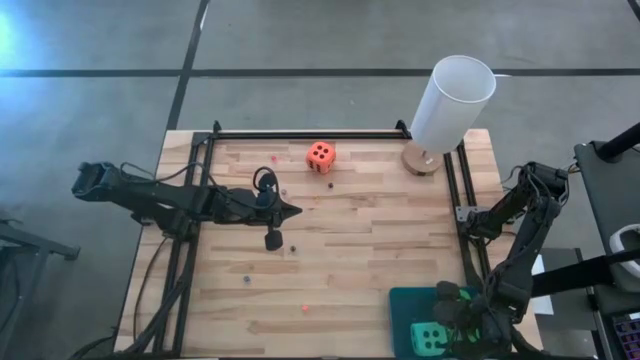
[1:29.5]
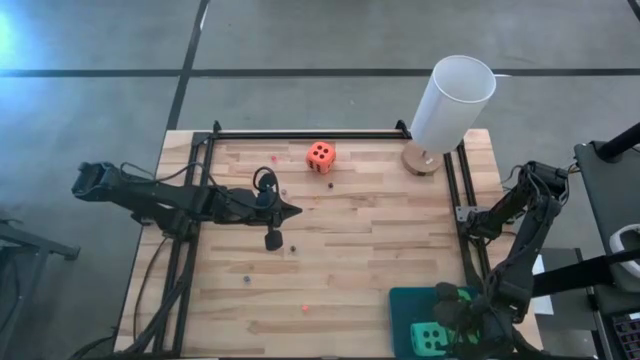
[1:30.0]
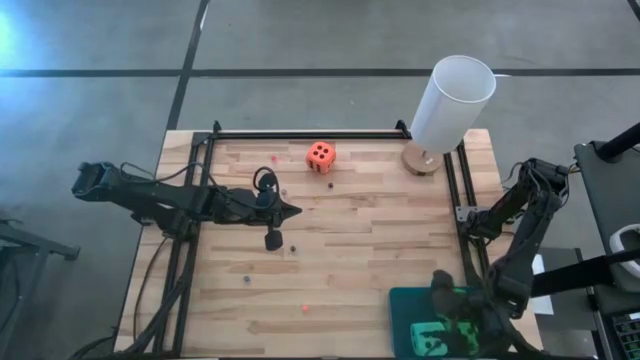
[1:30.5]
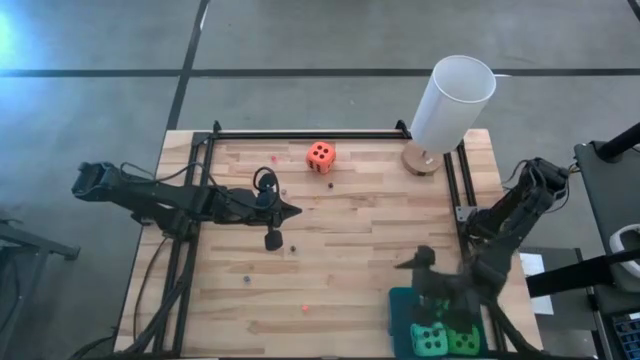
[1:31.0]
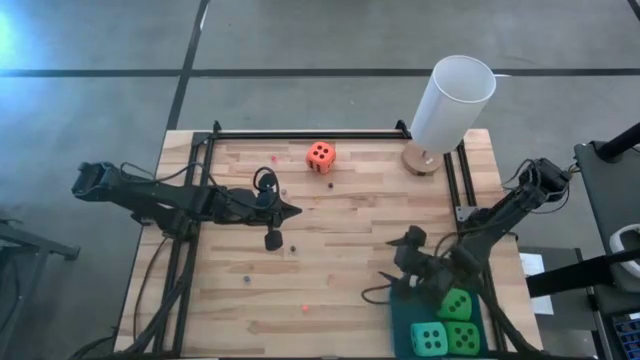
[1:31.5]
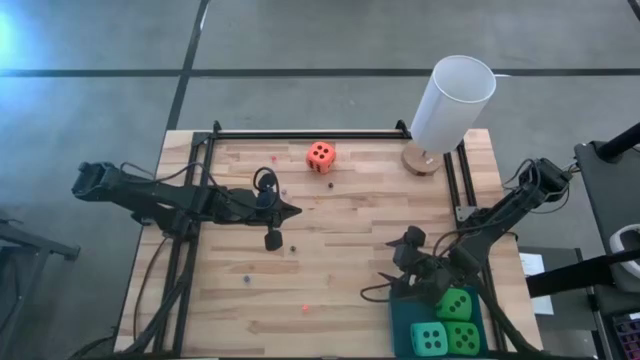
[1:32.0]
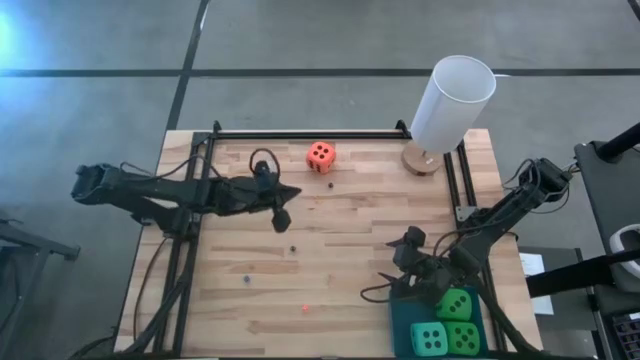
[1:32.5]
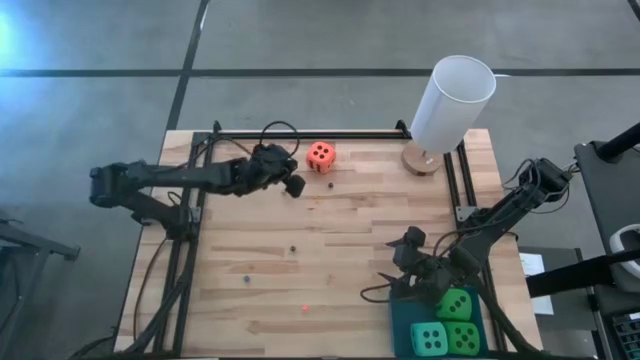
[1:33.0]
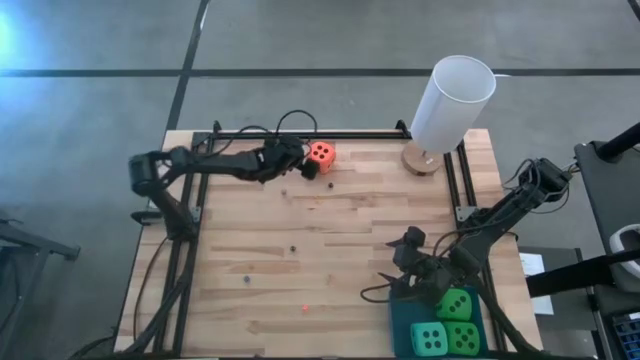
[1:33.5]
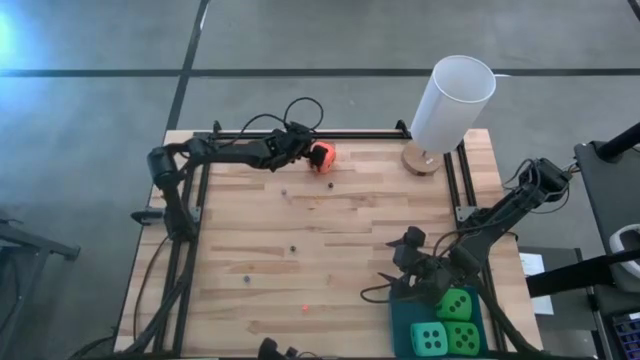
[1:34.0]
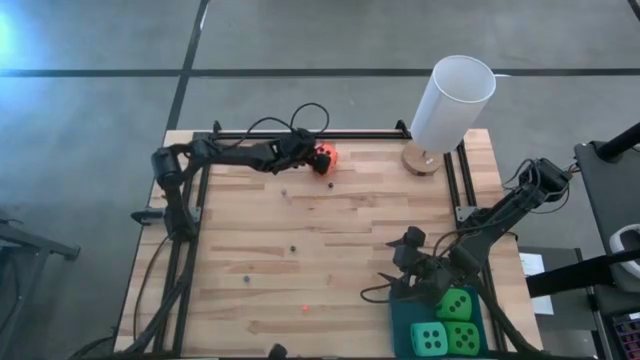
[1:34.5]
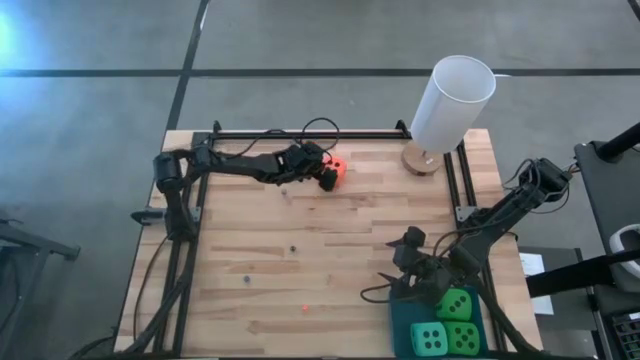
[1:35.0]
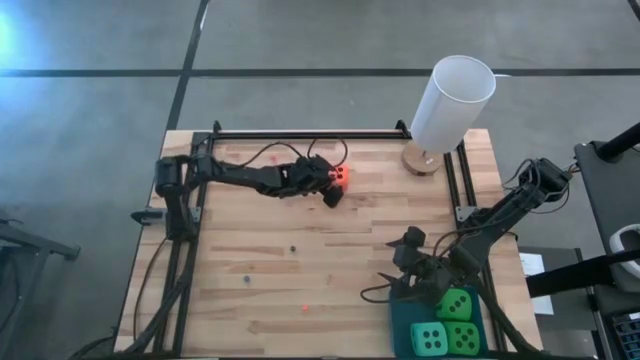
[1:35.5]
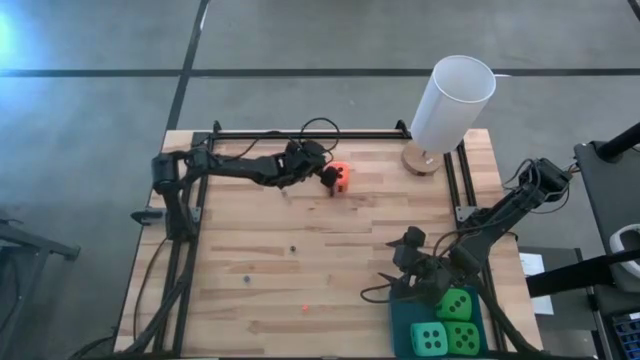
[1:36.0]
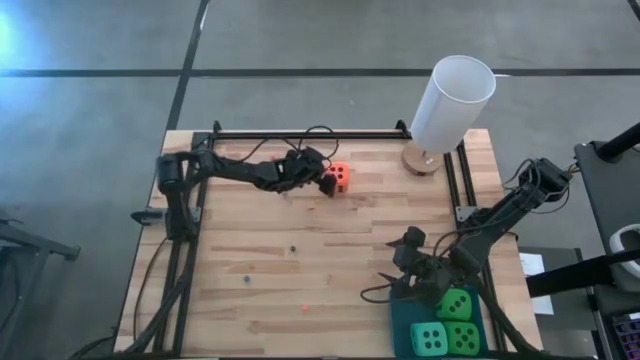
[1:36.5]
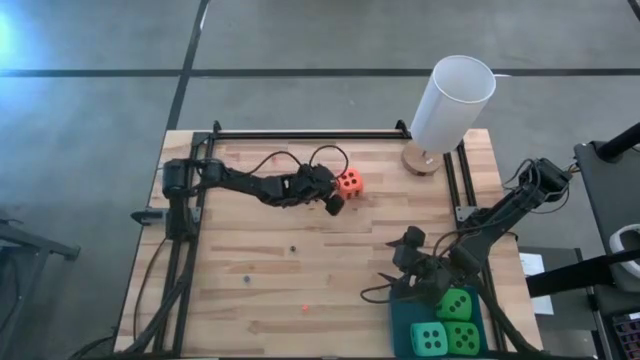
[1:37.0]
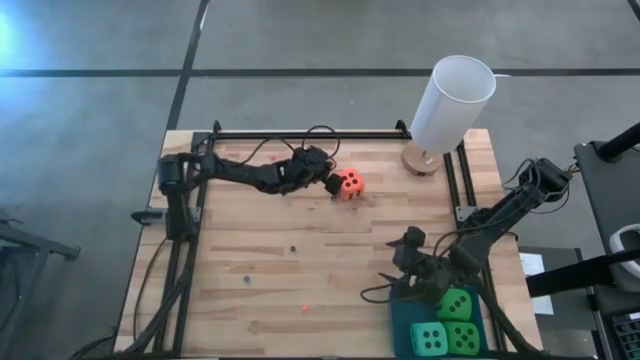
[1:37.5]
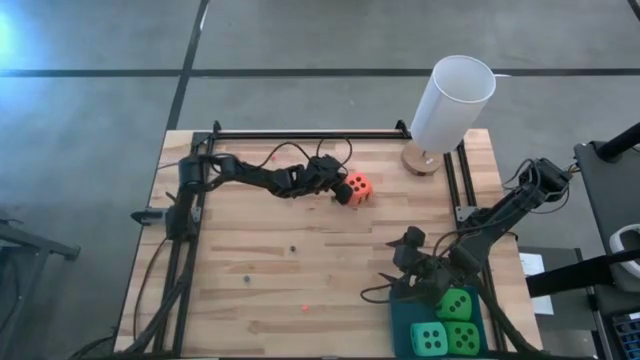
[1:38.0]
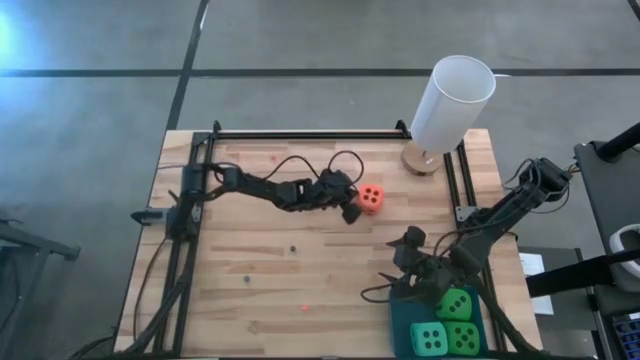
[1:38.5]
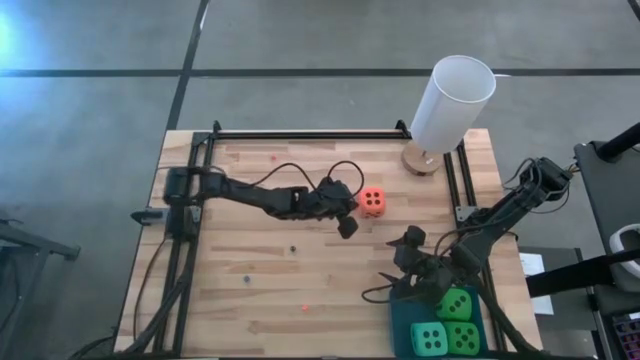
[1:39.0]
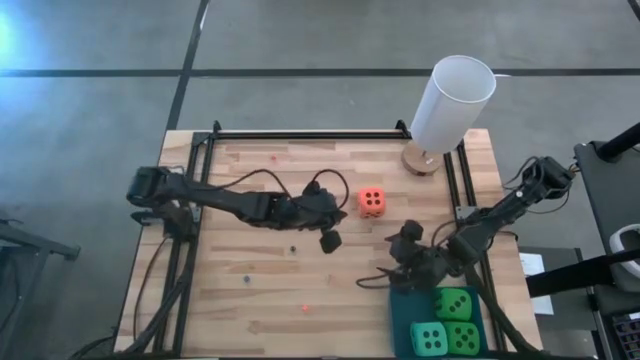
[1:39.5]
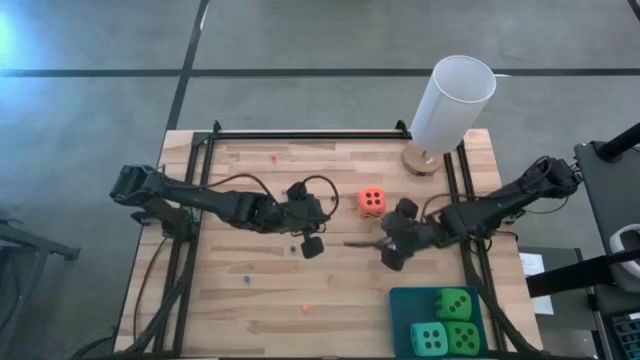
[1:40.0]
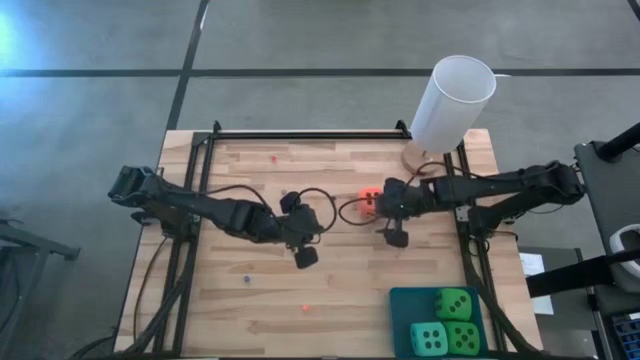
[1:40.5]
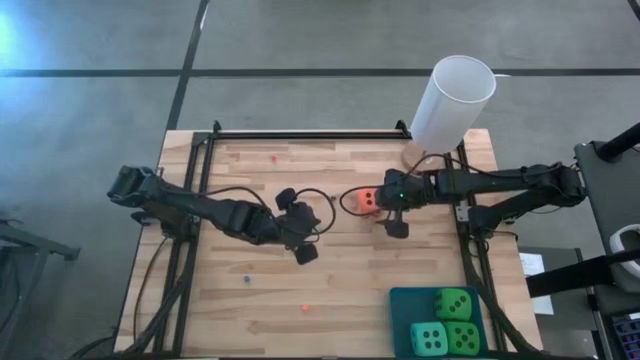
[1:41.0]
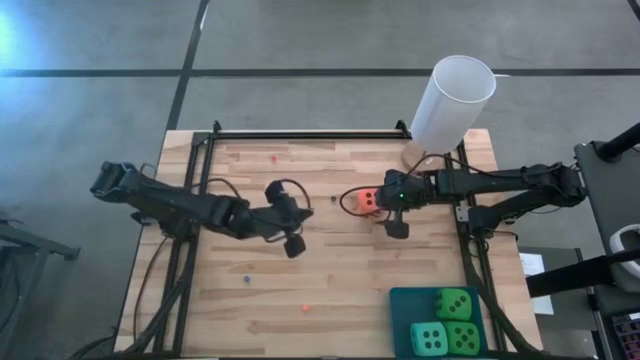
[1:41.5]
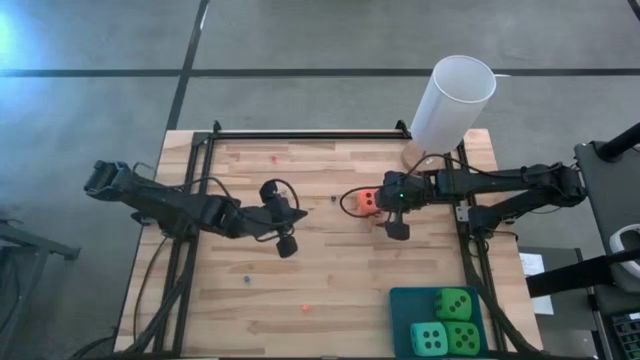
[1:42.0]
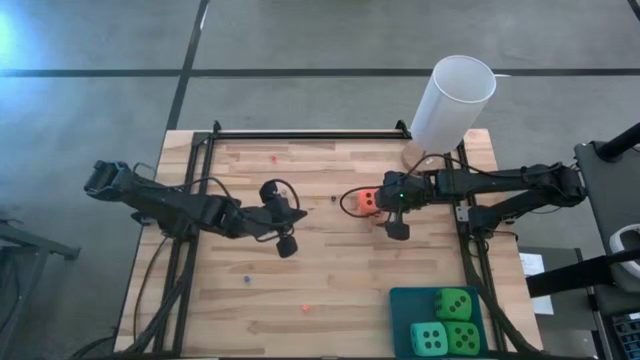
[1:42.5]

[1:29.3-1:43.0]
Task: Pick & Place Dice
Put the large orange die into the blue bin

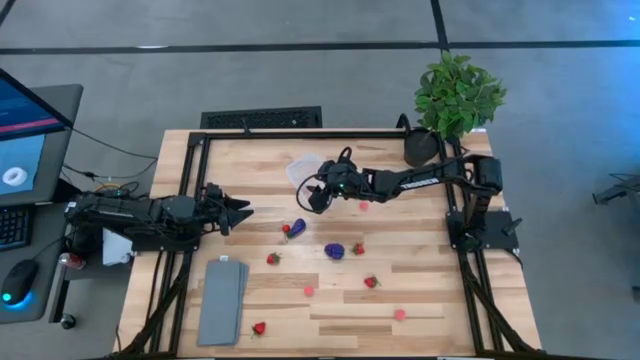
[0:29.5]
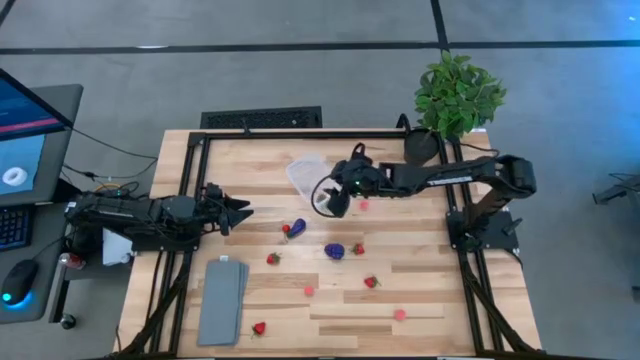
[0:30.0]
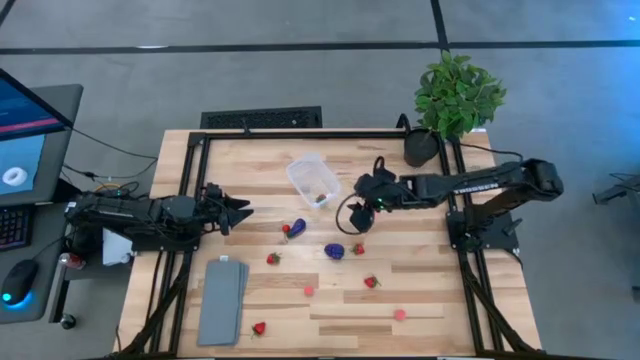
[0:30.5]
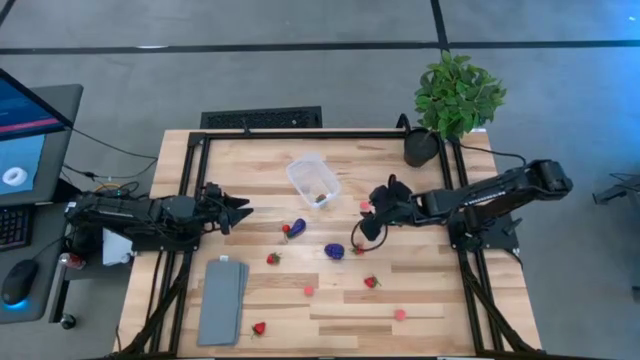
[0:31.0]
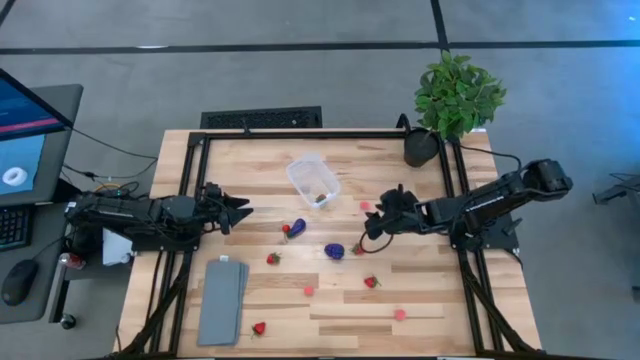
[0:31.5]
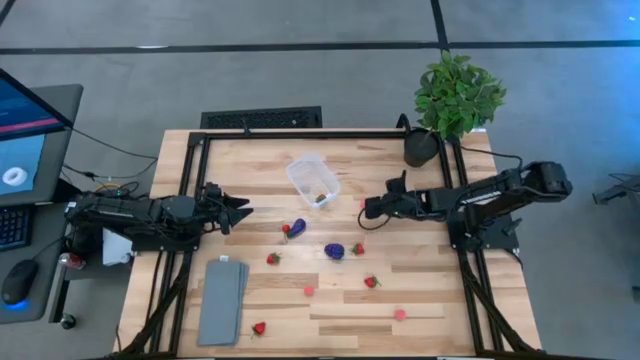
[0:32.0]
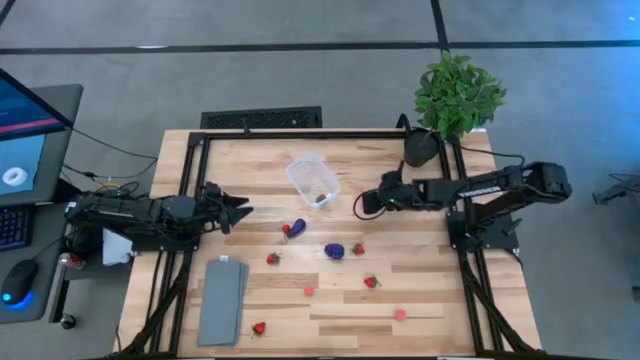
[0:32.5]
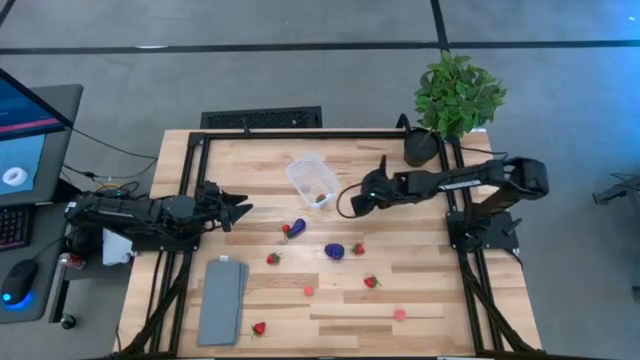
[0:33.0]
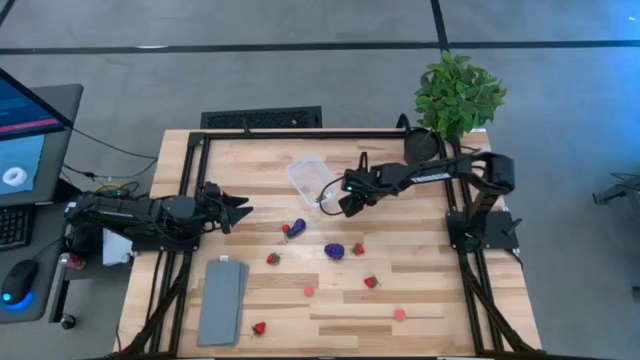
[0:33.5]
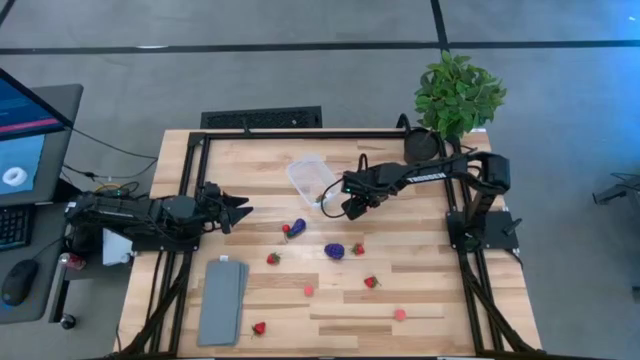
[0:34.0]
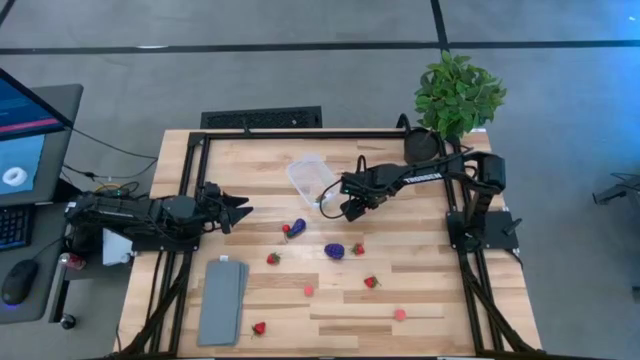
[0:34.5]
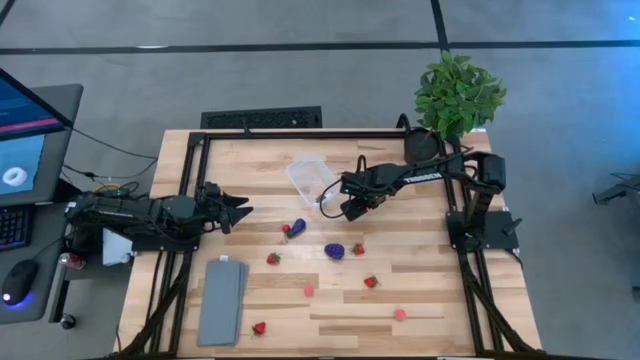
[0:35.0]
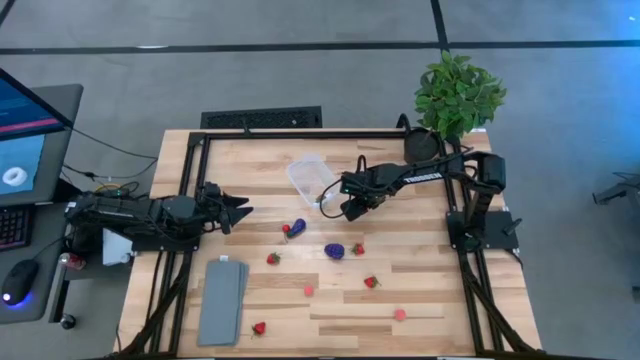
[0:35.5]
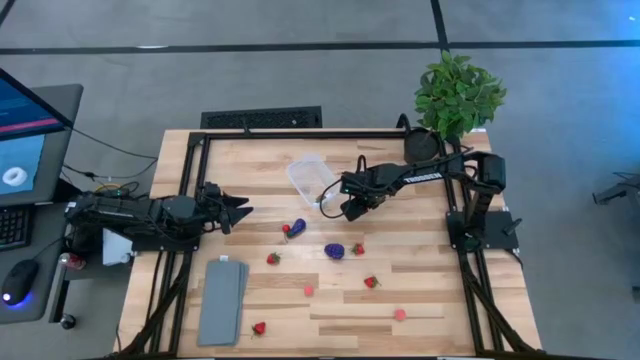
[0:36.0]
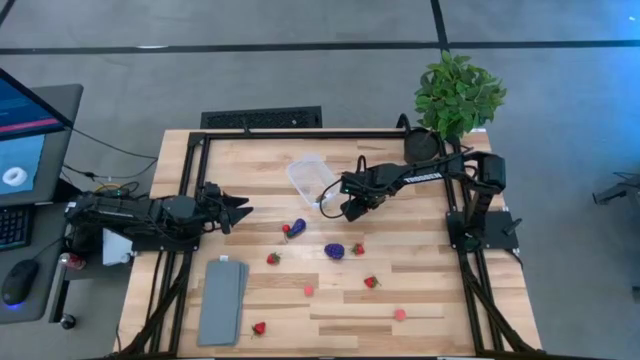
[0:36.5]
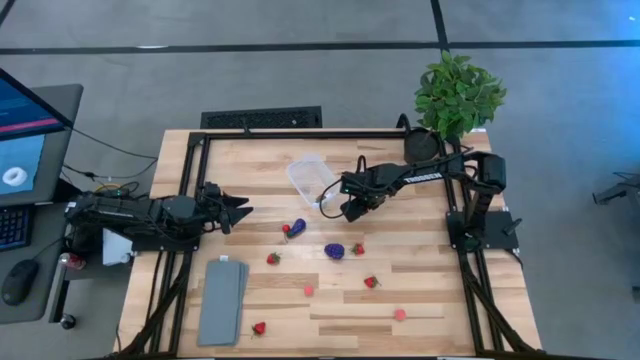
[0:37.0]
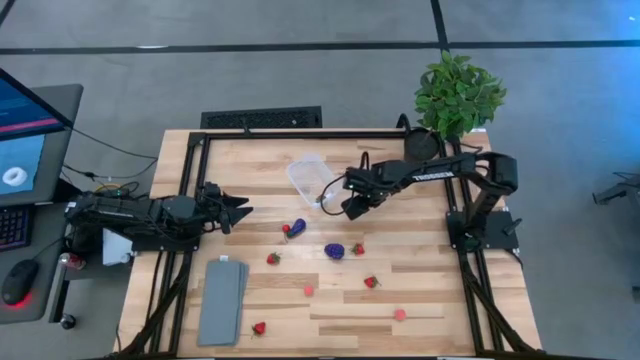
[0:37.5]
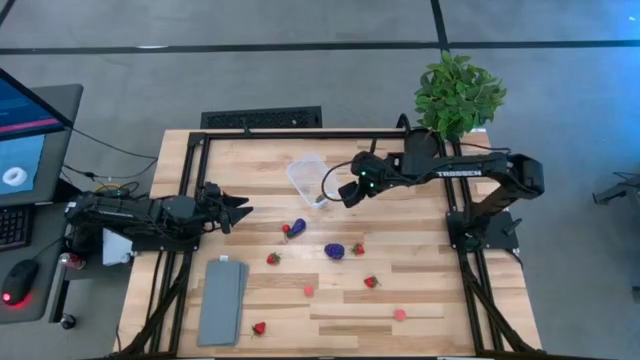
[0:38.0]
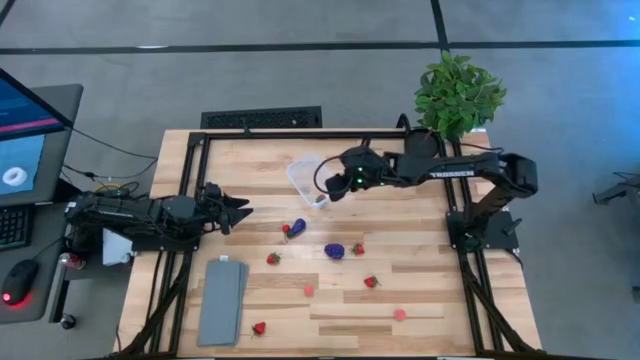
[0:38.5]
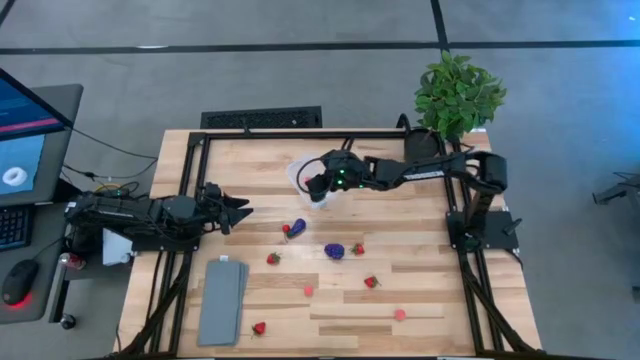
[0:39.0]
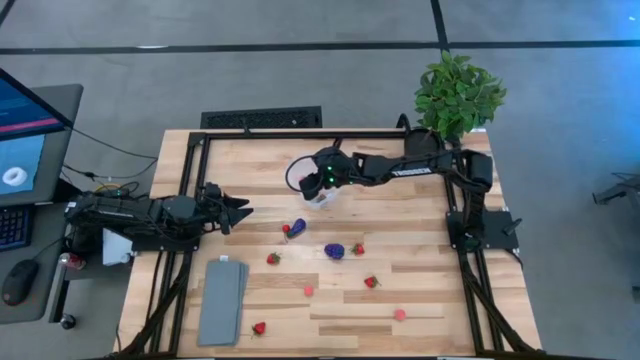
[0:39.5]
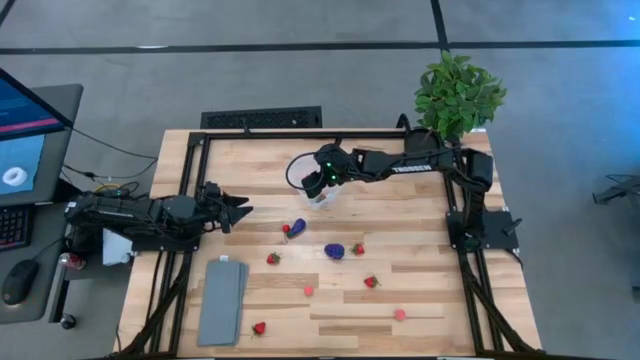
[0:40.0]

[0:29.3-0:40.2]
Task: Pick and placing Produce into tupperware
Put the top peach into the transparent container
